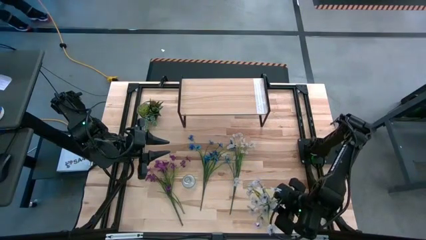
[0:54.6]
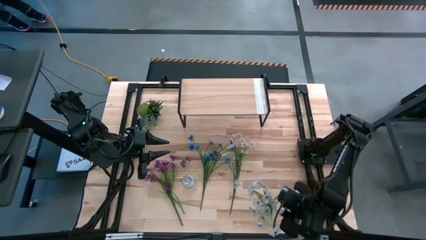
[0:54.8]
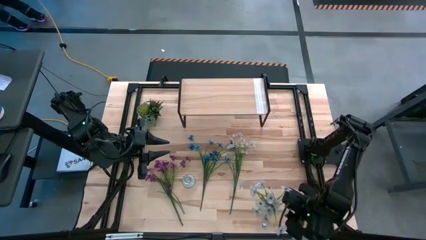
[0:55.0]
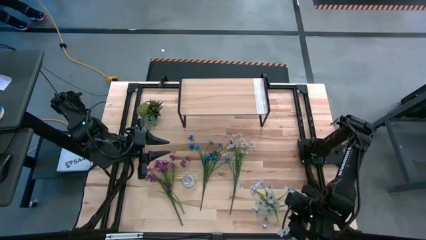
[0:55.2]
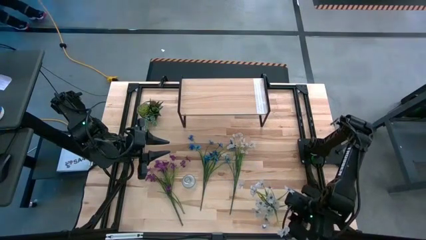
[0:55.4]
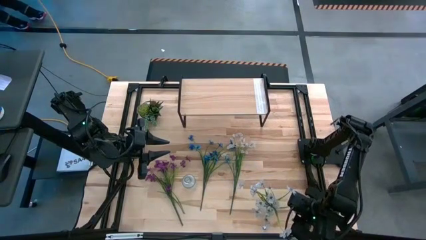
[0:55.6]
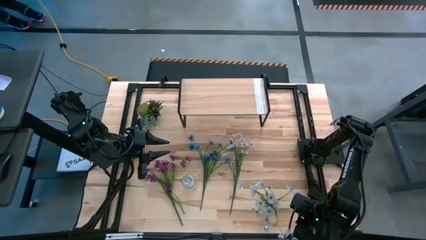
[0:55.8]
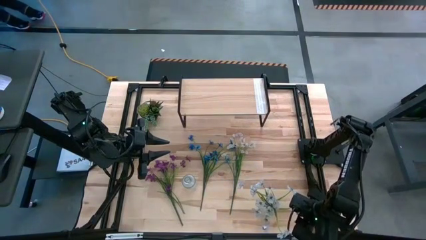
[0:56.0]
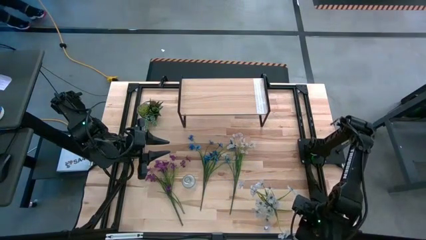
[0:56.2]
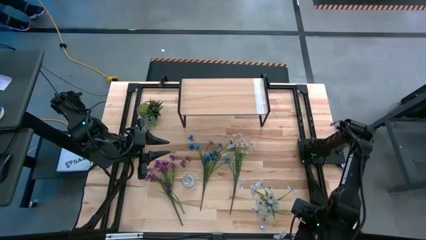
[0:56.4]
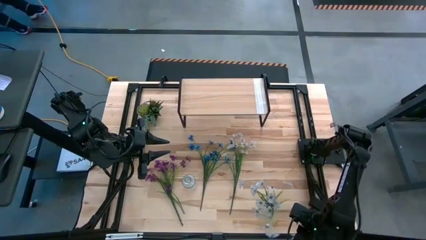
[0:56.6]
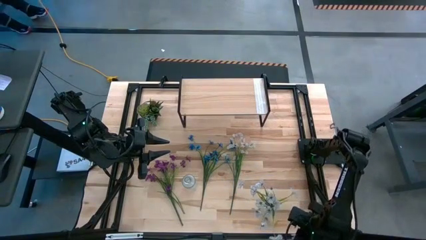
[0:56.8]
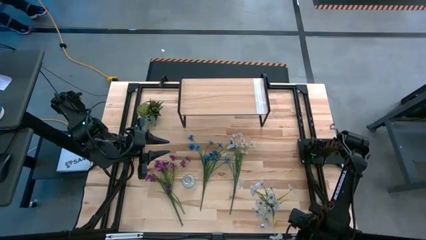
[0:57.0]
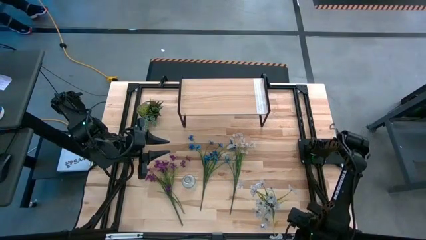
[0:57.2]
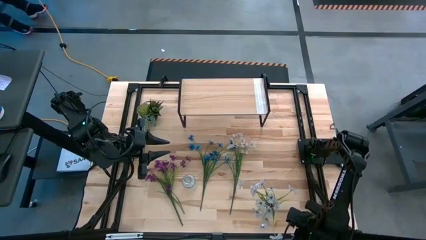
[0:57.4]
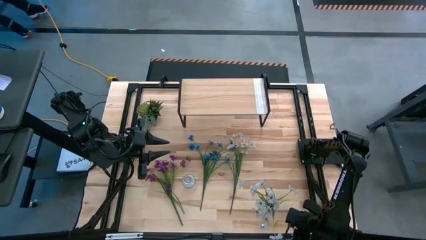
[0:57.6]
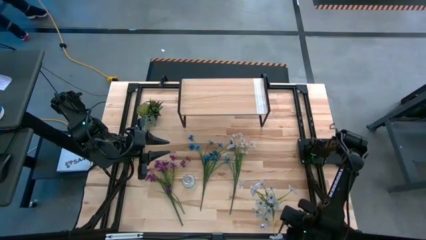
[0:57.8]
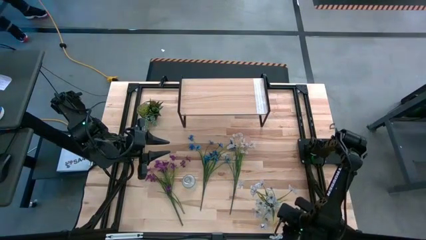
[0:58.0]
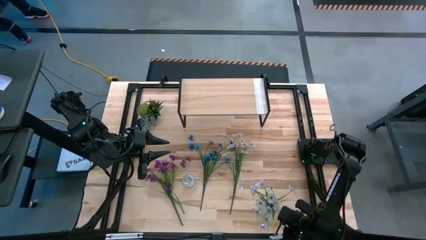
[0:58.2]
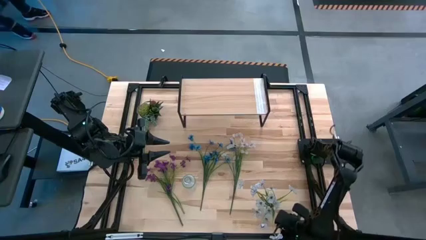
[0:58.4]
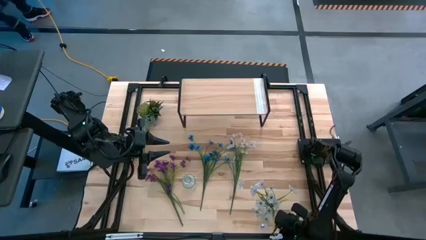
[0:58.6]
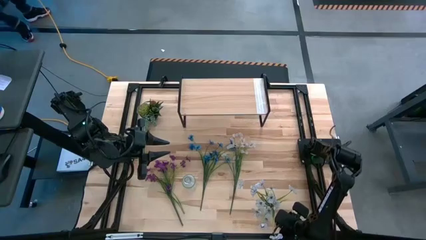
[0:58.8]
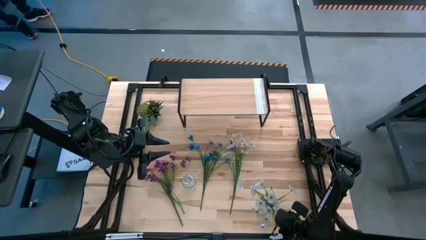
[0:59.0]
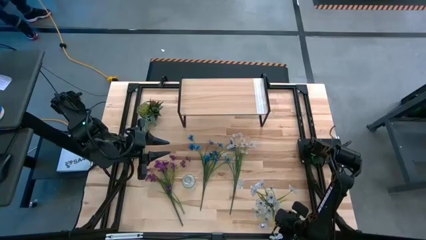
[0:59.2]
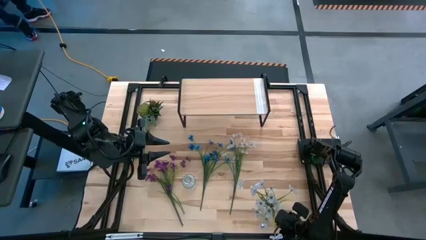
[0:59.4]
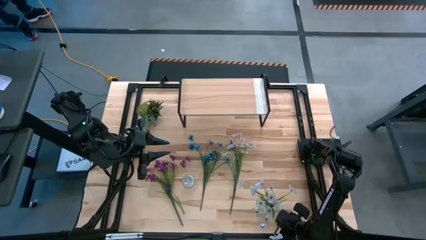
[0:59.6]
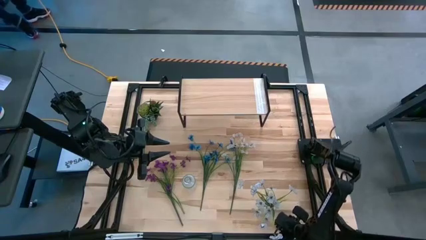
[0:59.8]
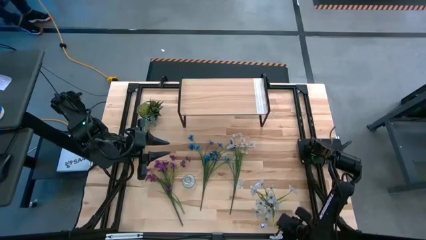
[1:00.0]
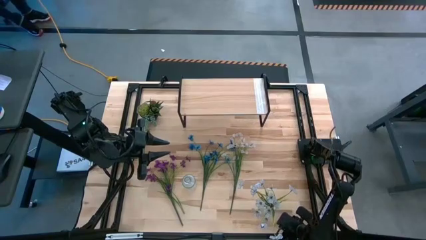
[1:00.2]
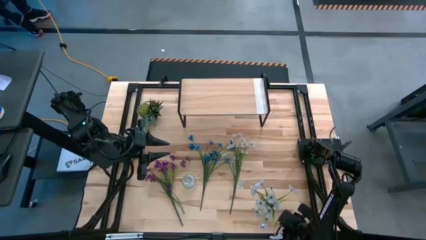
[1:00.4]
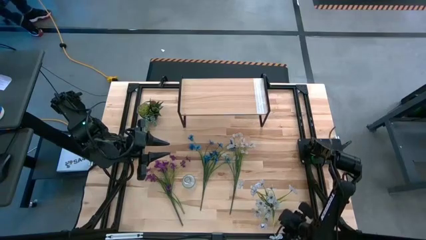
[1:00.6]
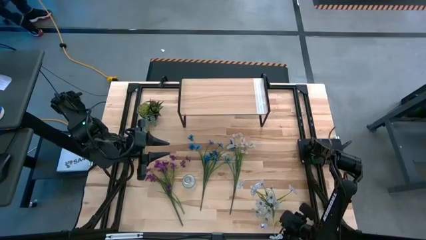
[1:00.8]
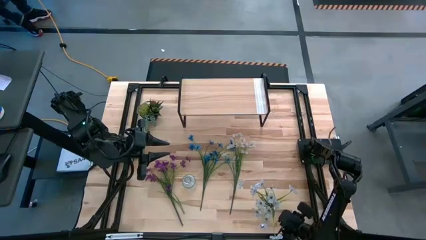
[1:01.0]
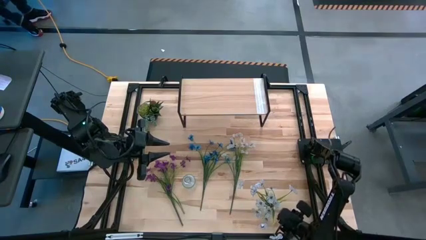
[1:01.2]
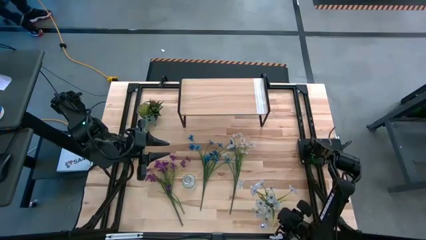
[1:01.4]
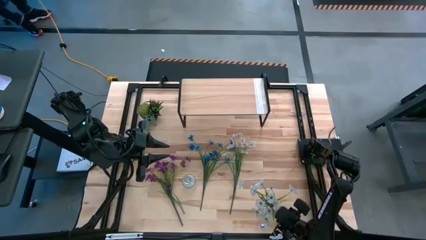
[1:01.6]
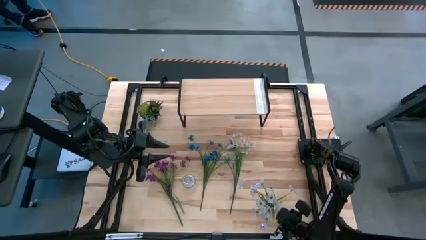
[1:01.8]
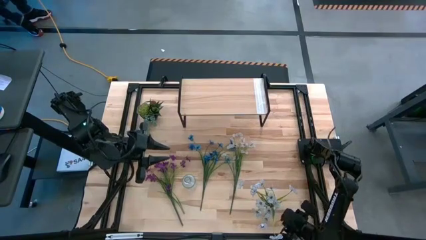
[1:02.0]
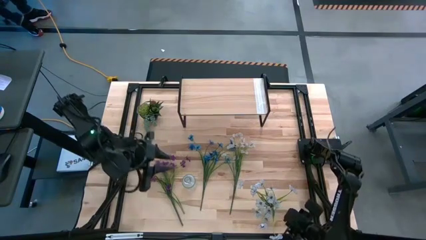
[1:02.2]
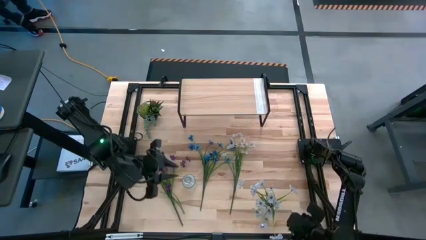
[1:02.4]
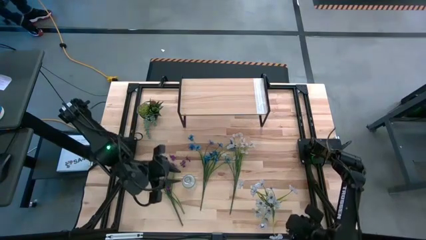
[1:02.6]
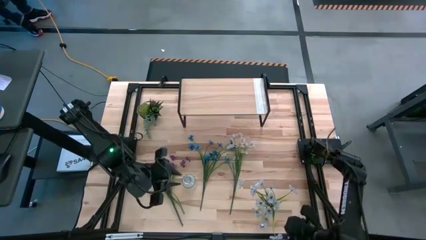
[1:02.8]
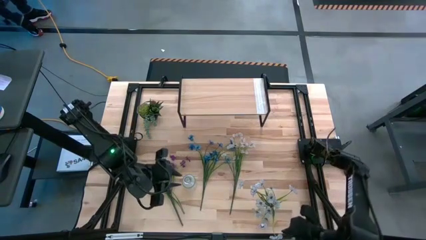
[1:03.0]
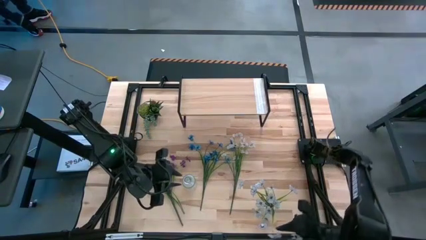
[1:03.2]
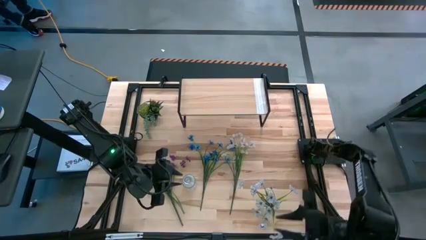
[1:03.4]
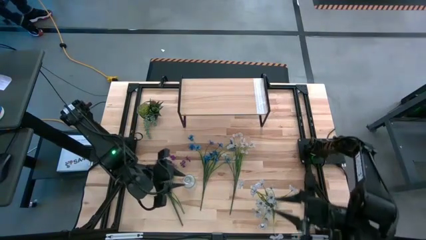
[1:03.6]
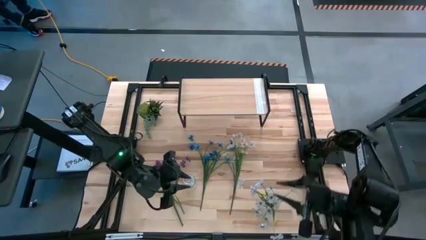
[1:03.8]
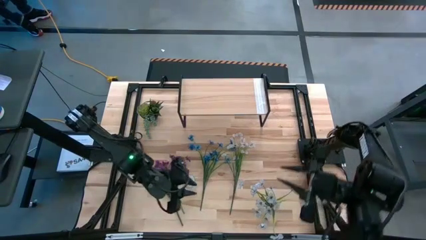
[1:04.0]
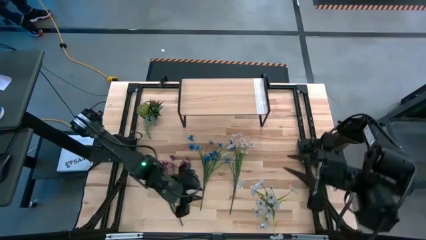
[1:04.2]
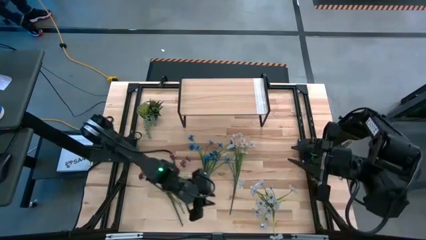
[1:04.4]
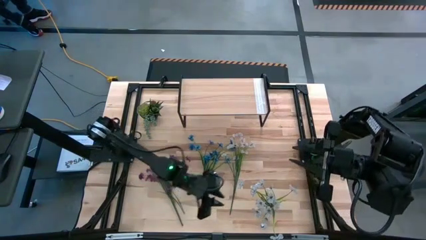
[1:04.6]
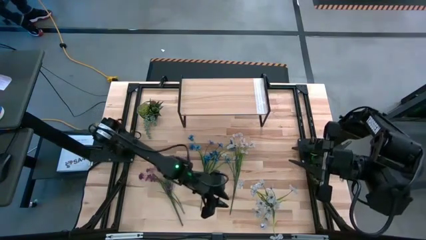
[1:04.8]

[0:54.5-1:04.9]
Task: Pick and place flowers into a vace then onto a shelf
Adjust the right transparent vase

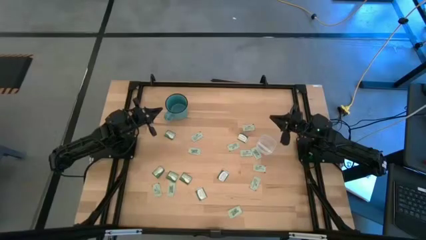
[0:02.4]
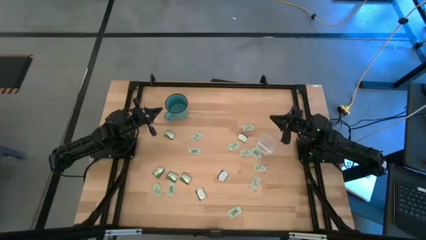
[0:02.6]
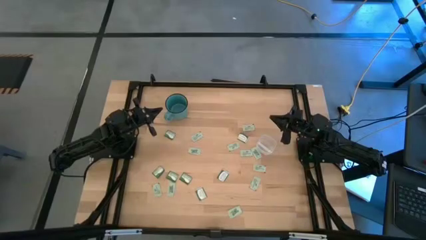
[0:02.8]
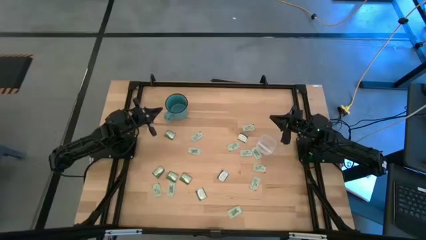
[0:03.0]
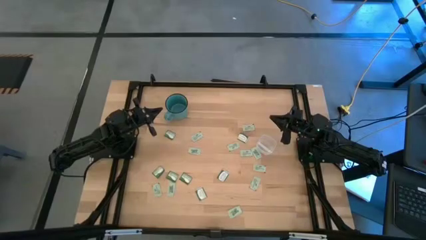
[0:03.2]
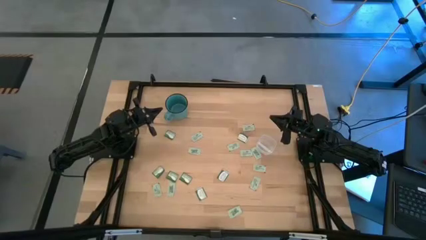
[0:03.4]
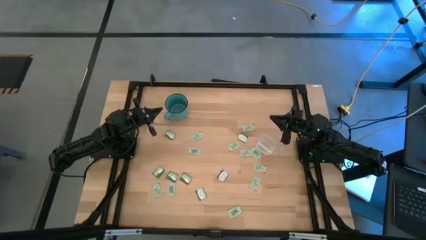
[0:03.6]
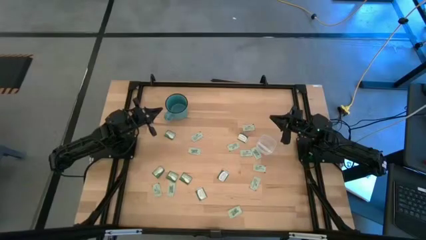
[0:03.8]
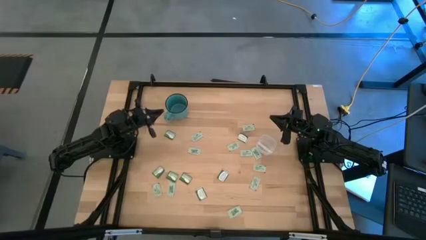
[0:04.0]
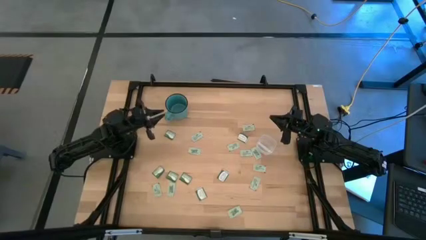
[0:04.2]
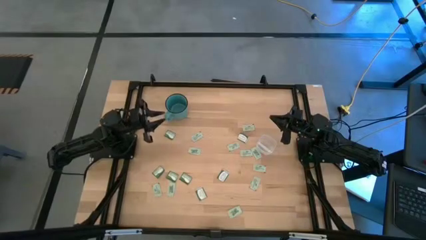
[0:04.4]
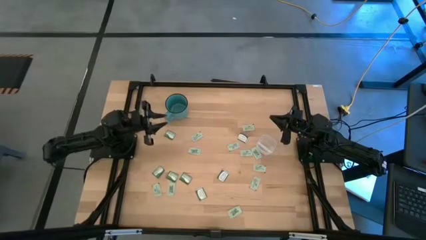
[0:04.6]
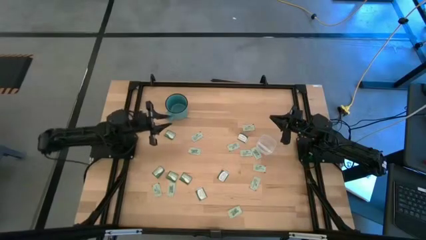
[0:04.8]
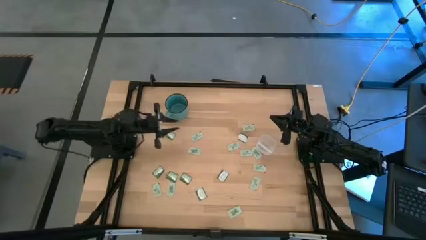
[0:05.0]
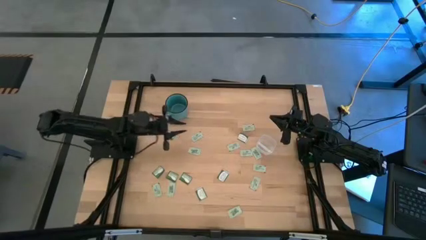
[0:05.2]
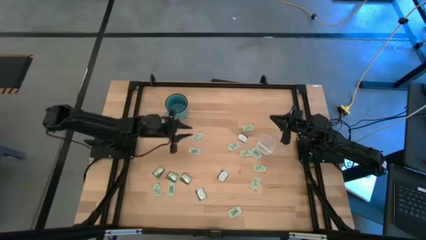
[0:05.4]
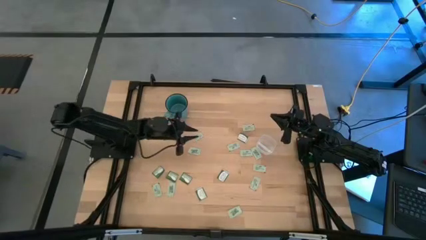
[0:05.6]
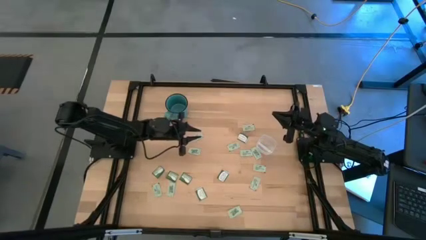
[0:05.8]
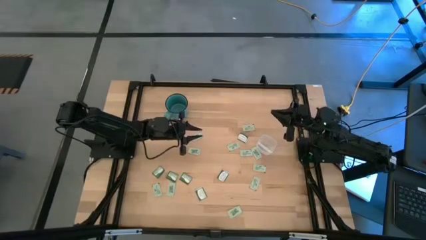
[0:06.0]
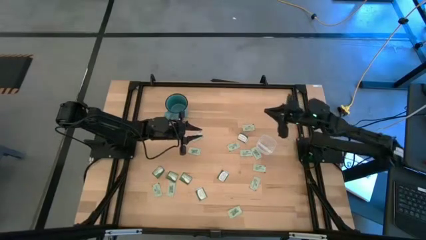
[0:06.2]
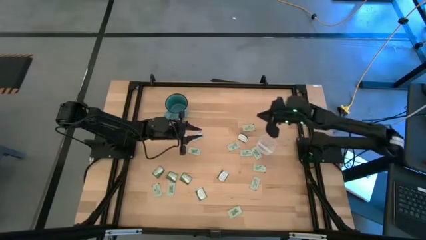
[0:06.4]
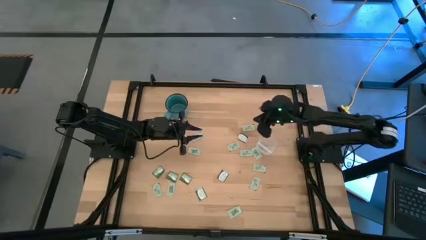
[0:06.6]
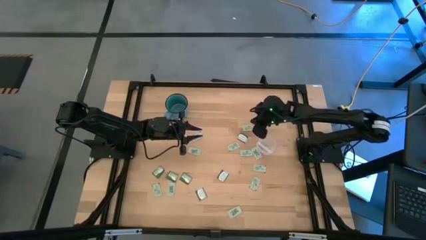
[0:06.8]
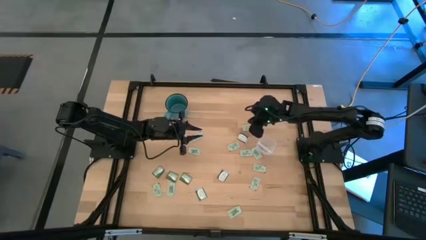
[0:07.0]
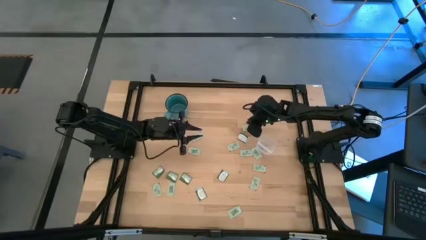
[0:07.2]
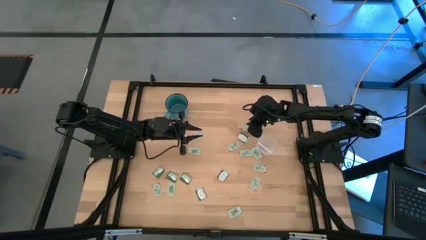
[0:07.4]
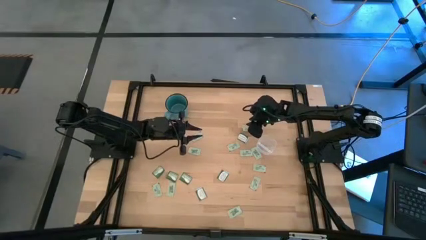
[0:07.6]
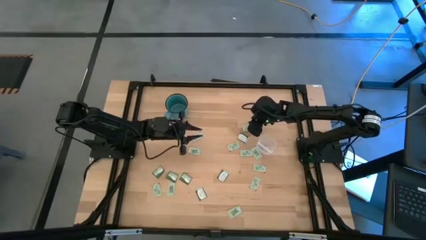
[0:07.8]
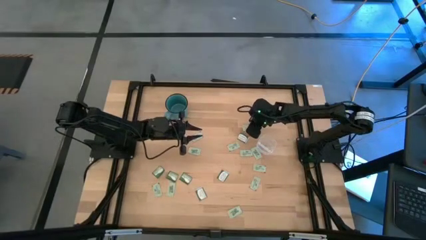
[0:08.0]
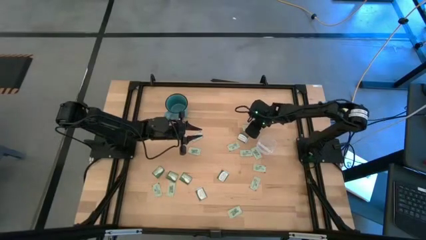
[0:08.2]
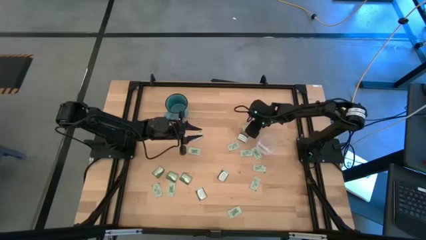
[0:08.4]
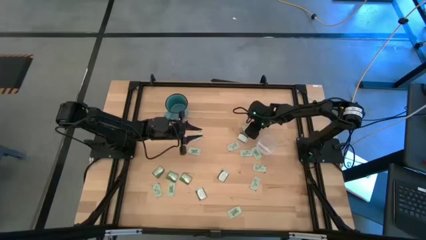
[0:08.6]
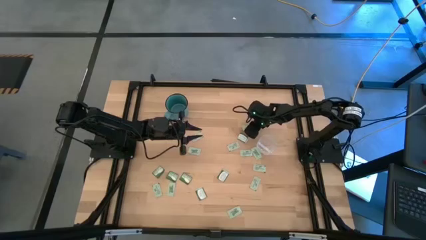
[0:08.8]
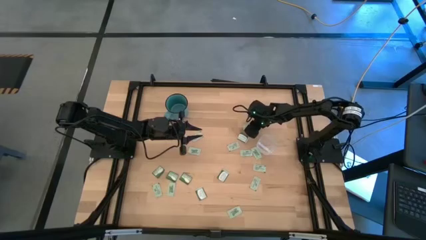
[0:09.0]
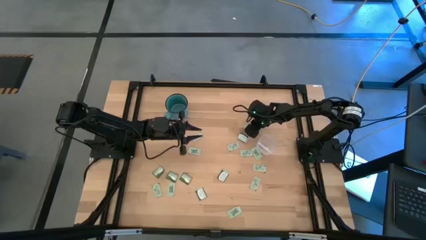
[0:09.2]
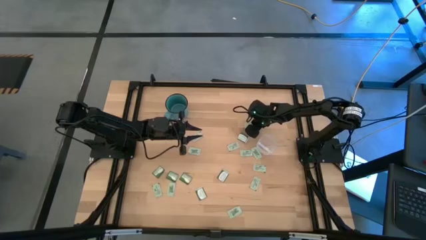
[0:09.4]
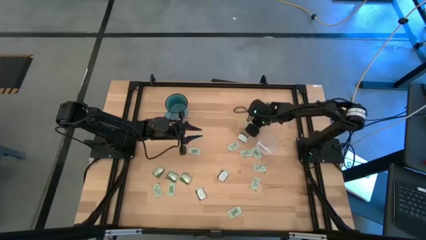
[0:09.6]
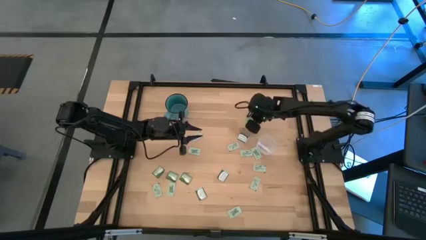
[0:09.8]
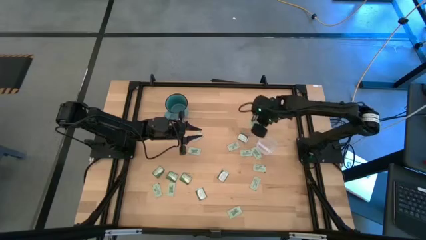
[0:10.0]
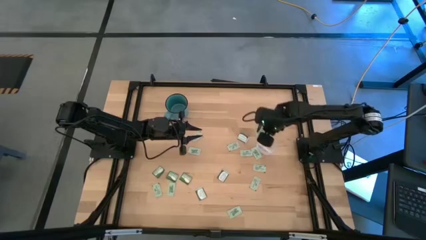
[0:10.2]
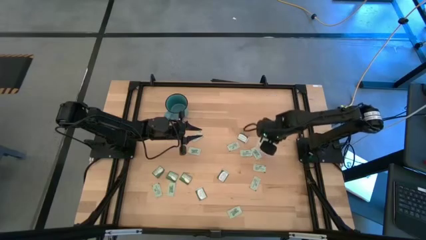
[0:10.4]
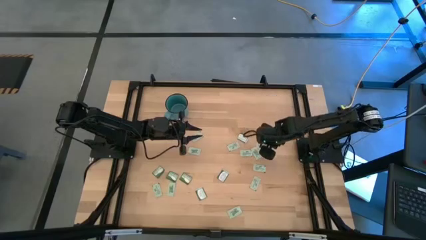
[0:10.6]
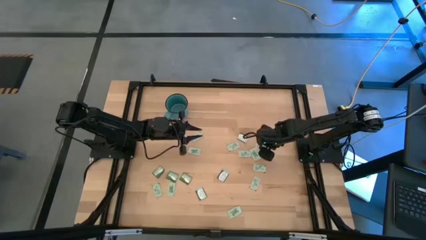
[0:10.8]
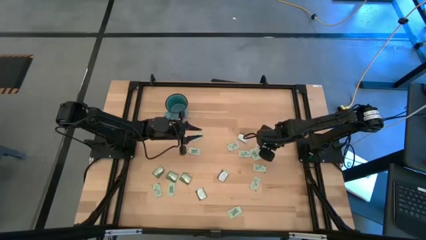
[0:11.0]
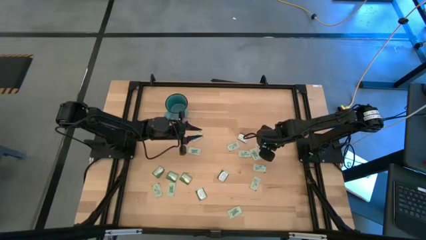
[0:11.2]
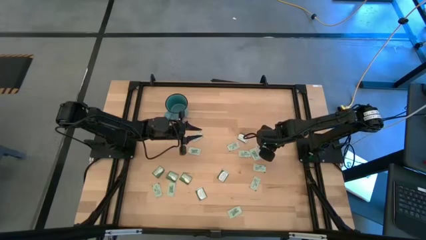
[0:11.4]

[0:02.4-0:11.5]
Task: Pick and place Stevia / Truvia into bins
Put the stevia packet into the transparent bin
